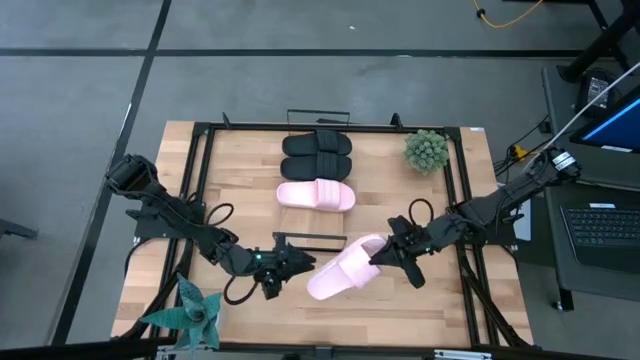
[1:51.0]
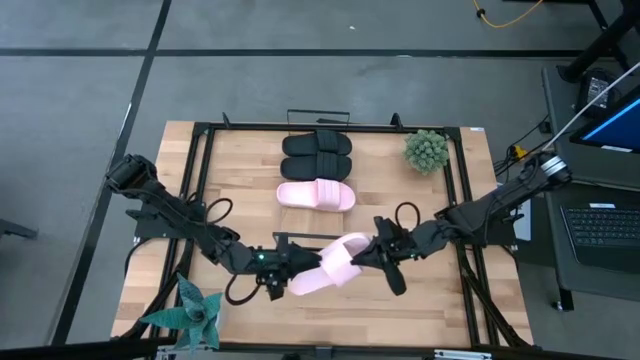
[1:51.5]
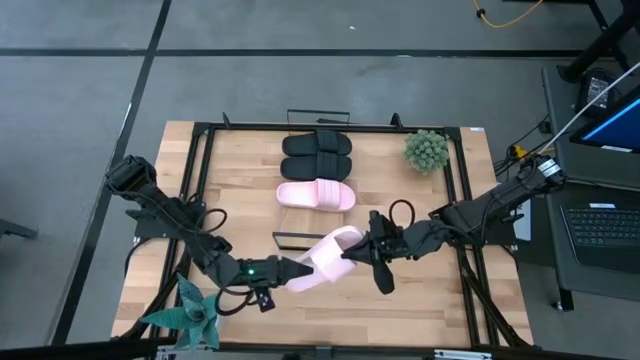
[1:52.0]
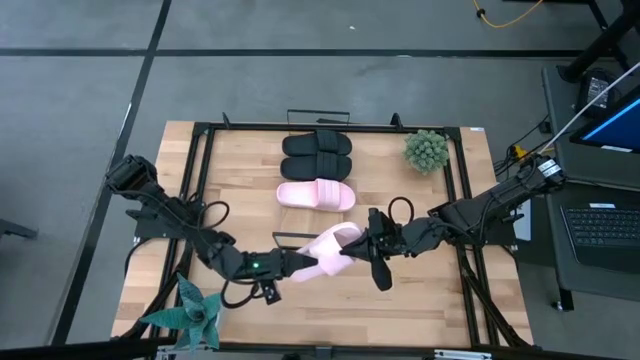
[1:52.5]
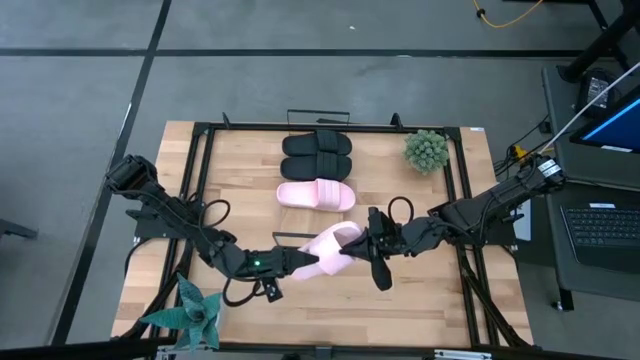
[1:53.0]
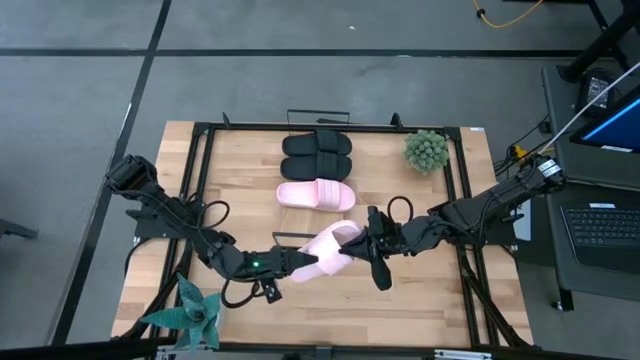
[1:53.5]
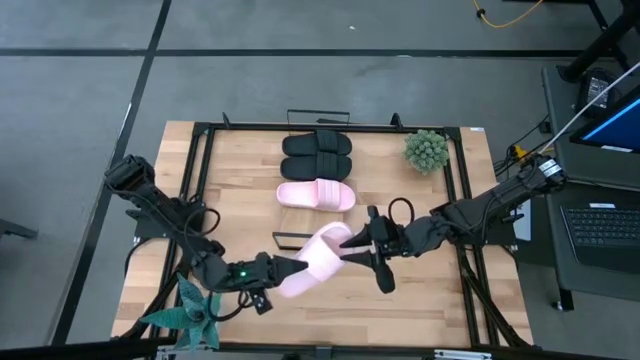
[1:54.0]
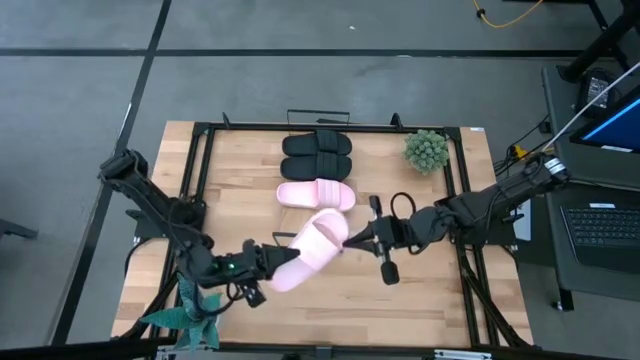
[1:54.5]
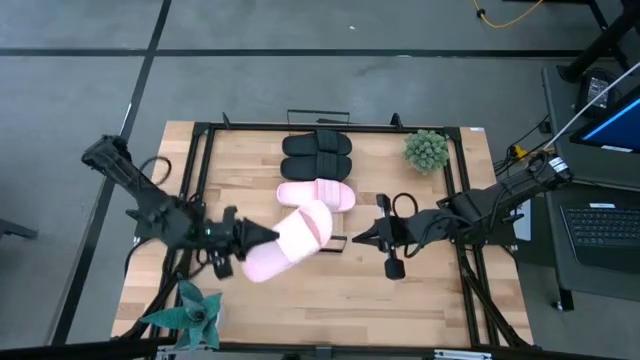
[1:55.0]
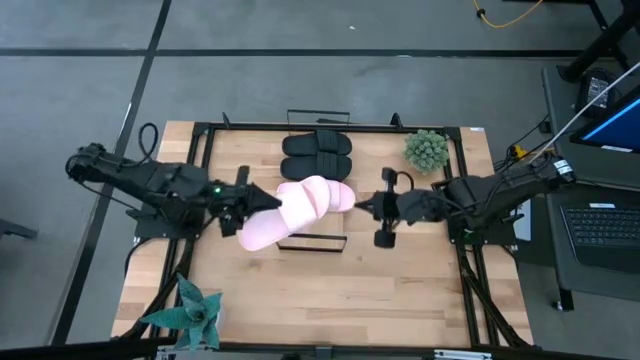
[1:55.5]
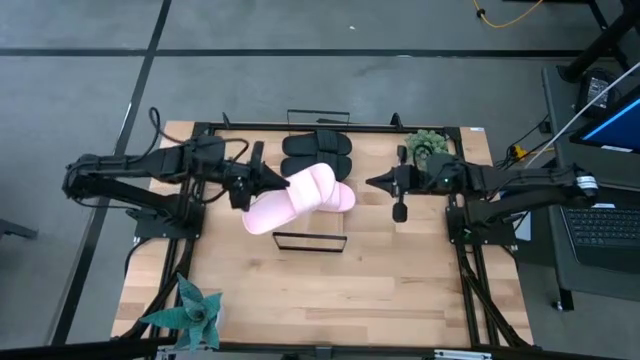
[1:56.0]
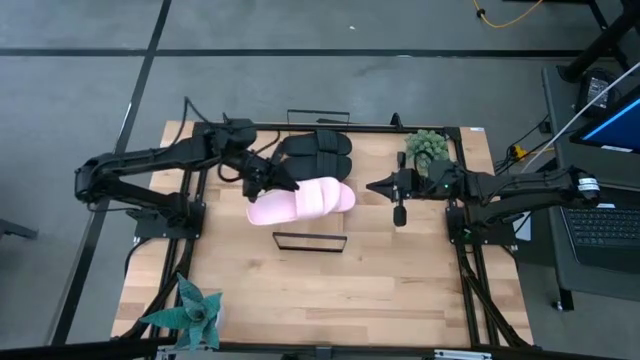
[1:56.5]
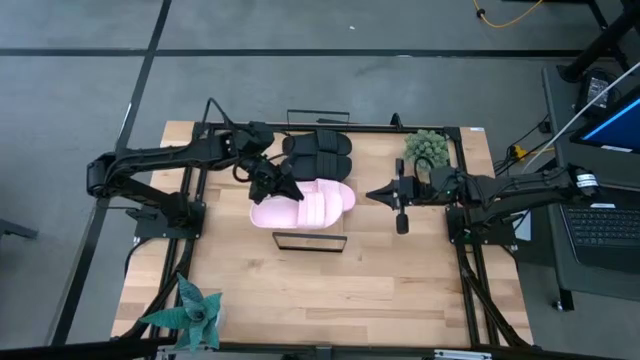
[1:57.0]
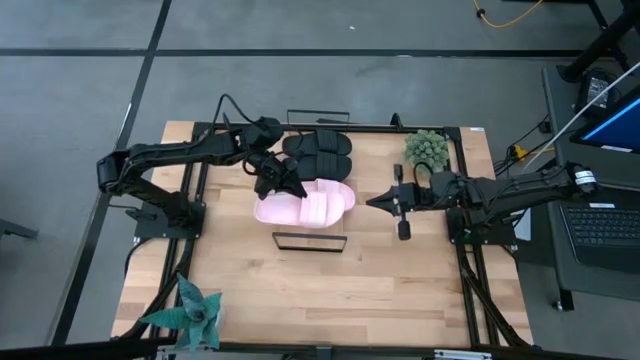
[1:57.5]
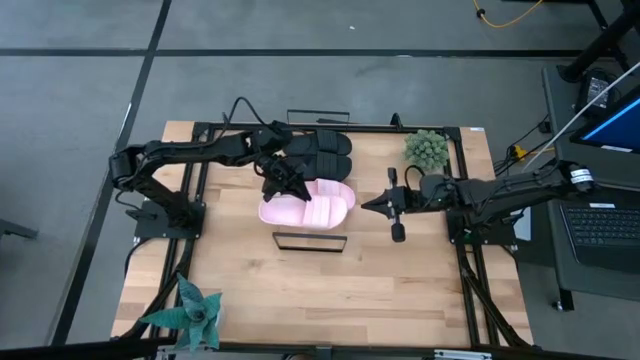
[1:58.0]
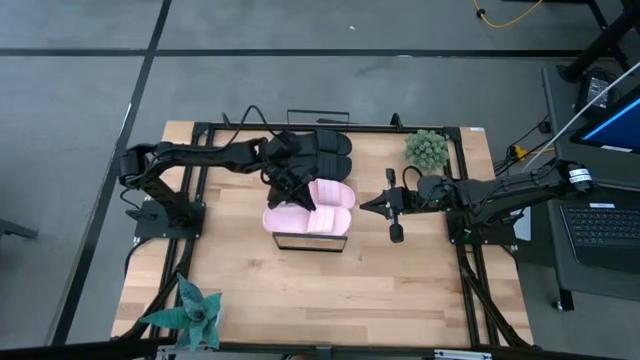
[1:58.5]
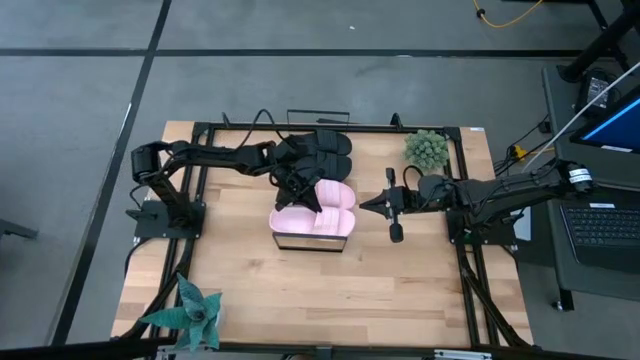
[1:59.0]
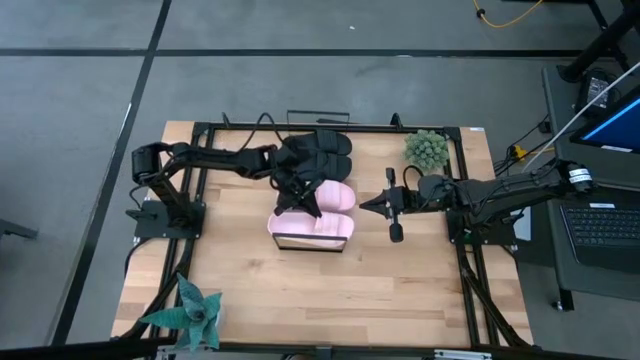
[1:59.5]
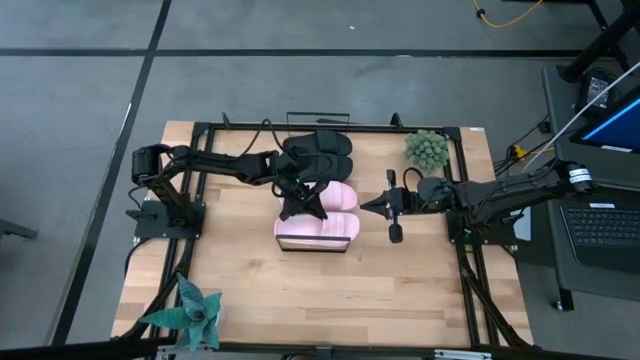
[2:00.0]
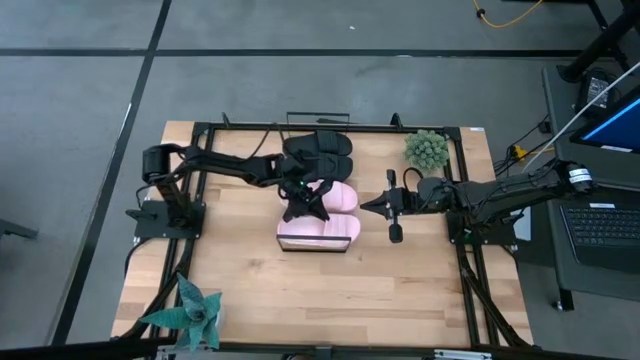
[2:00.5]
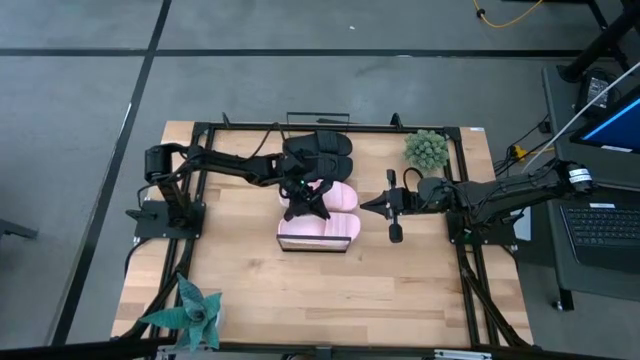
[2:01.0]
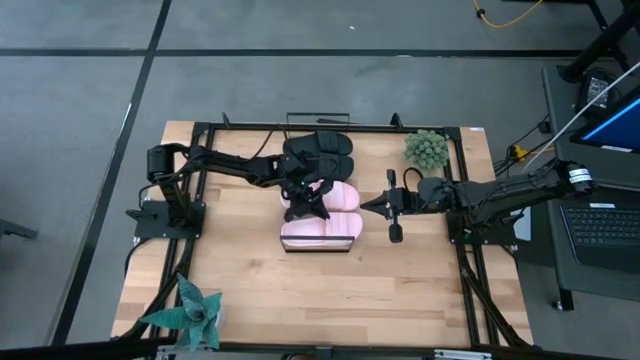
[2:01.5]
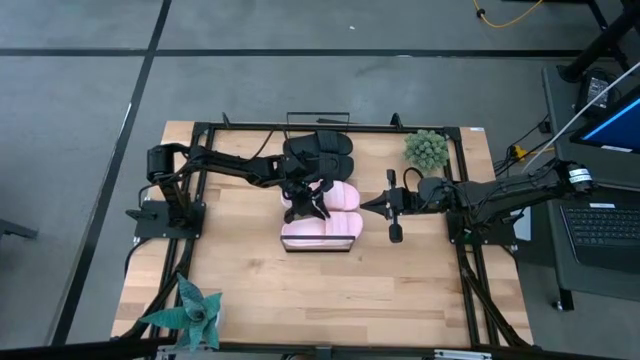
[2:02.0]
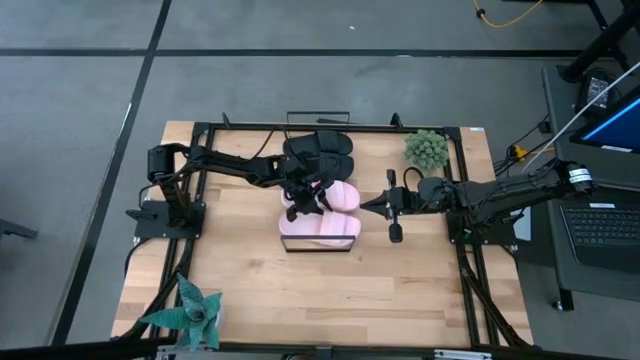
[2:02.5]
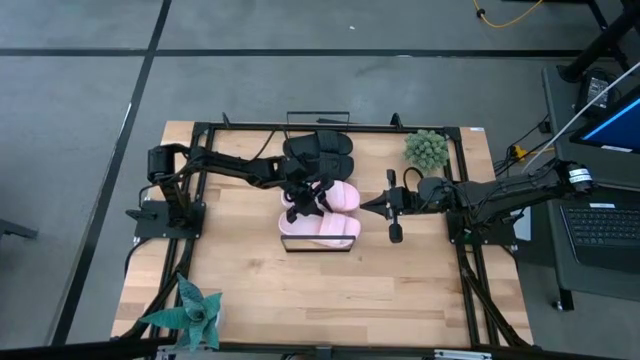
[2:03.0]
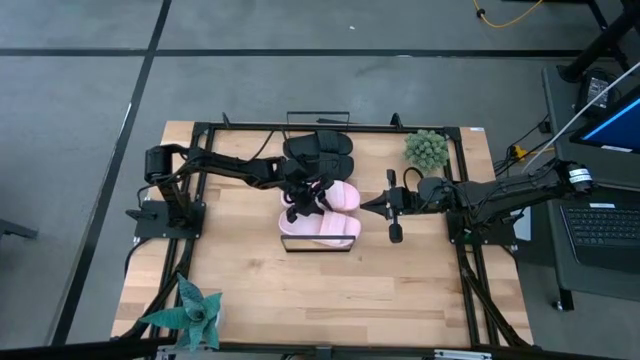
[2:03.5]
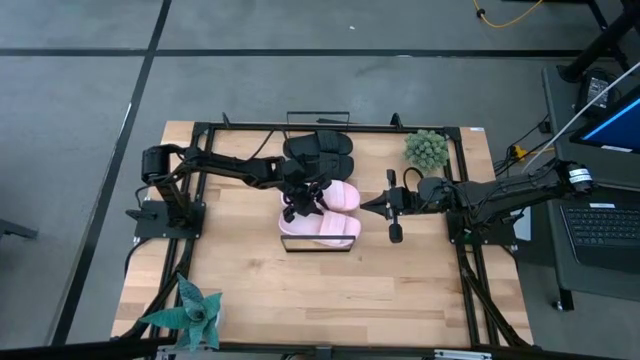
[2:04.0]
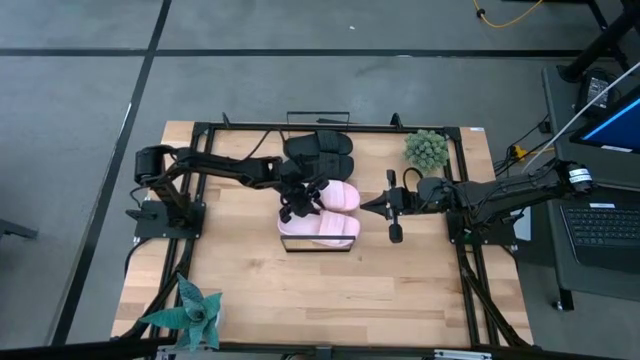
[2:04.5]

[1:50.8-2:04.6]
Task: Pick and place slides into the shelf
Put the pink slide on the shelf

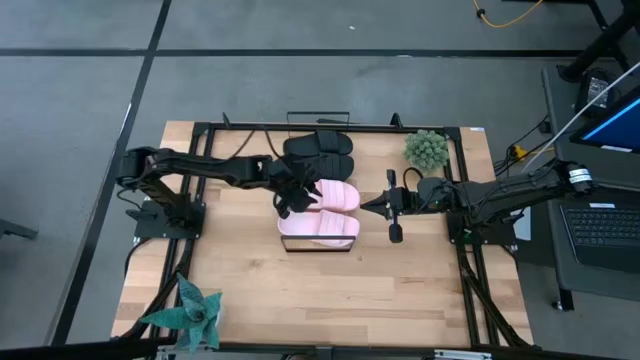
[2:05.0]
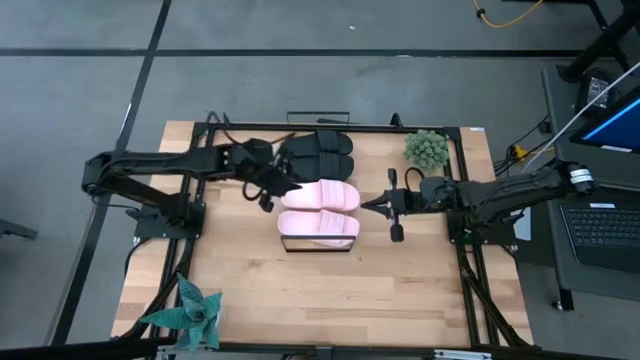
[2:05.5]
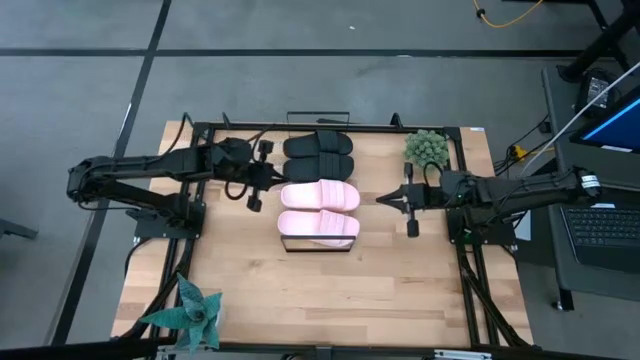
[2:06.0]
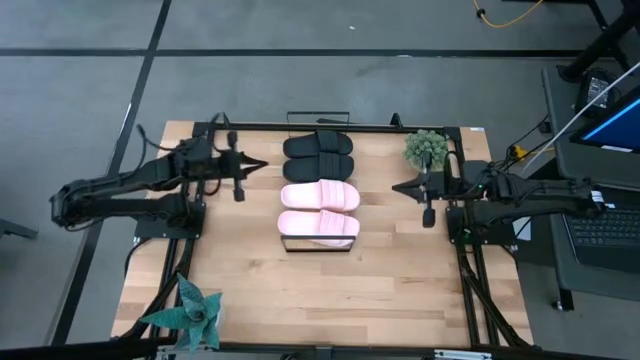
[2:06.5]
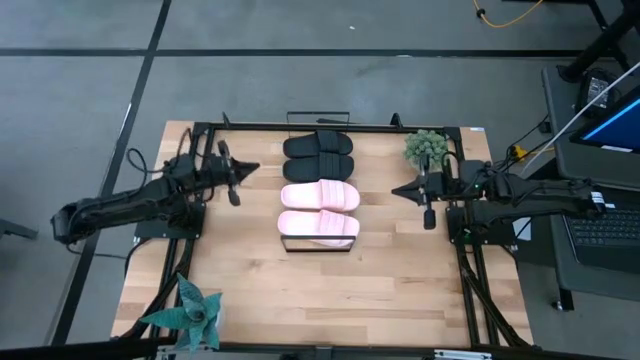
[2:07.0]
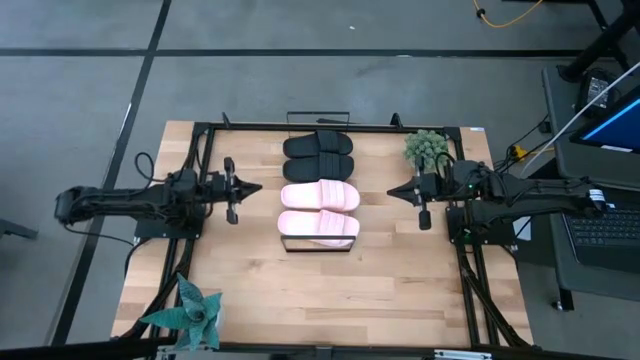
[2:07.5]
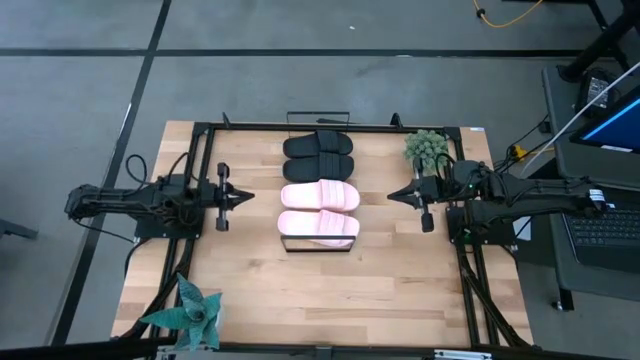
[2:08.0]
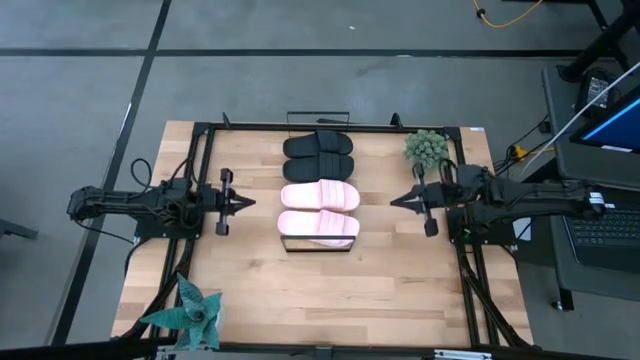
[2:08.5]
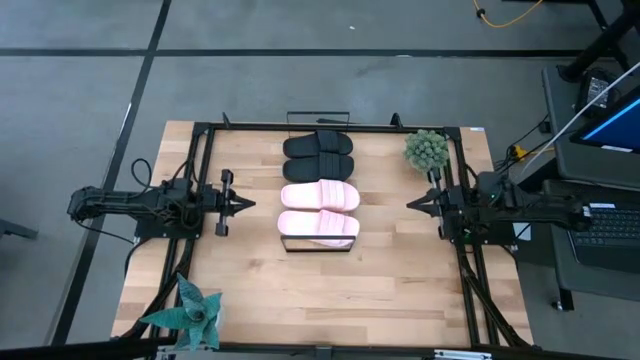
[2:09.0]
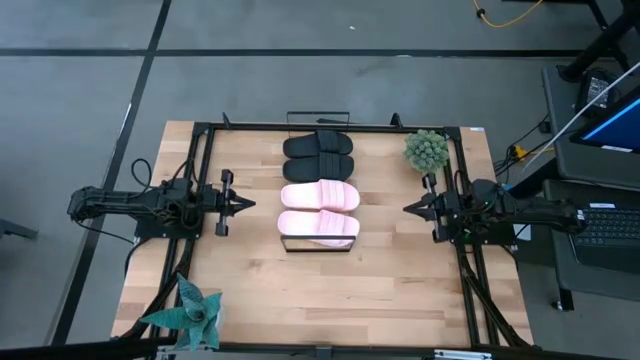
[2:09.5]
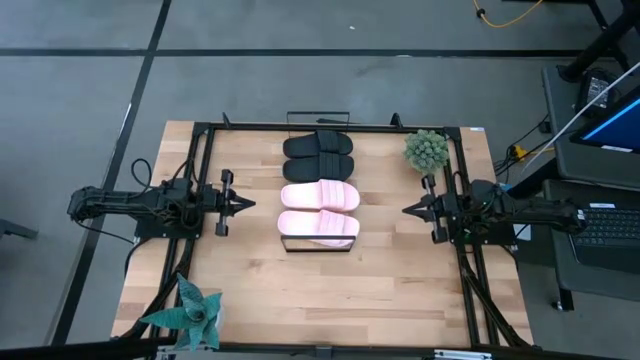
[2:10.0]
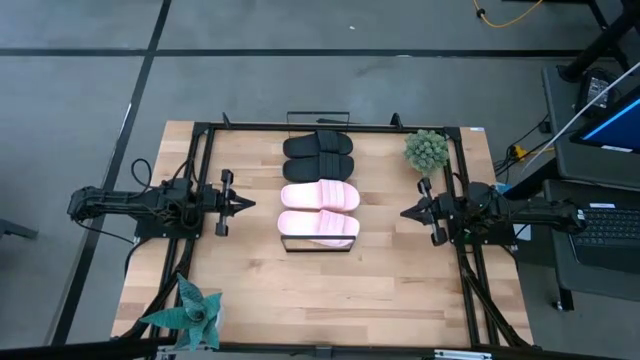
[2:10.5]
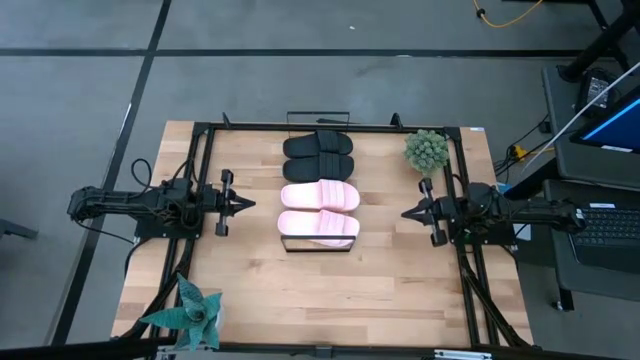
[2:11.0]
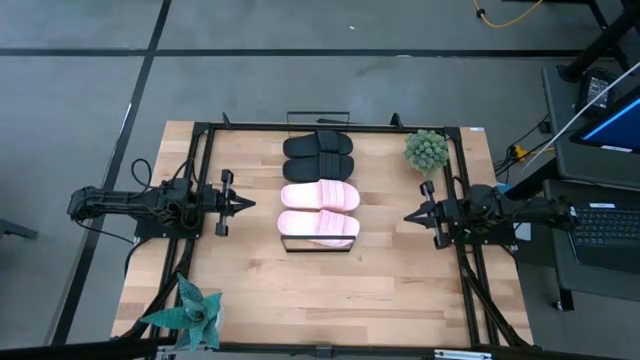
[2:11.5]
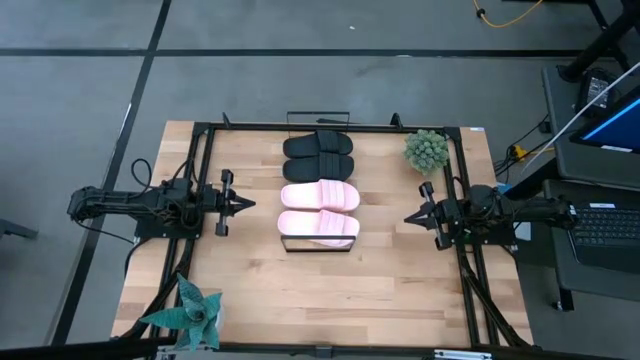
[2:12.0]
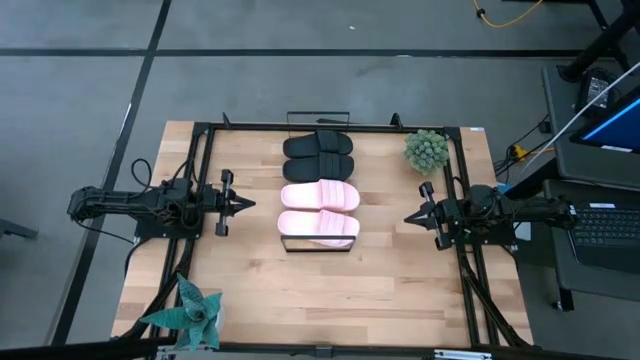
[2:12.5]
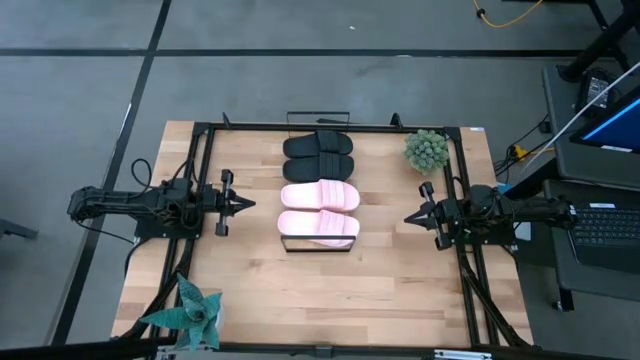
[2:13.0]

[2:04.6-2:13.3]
Return to Home Position
